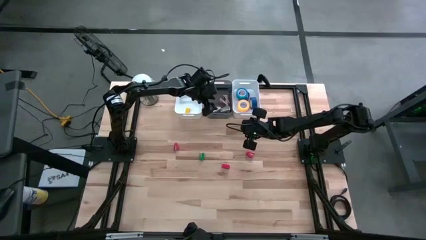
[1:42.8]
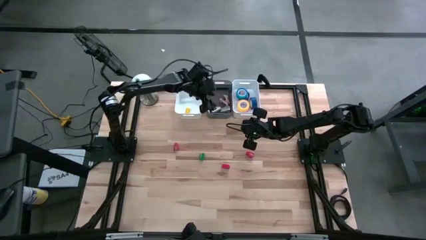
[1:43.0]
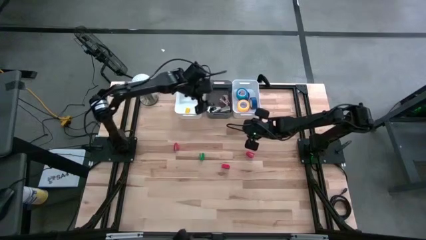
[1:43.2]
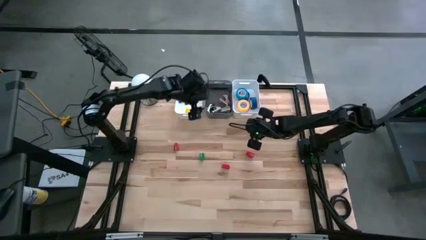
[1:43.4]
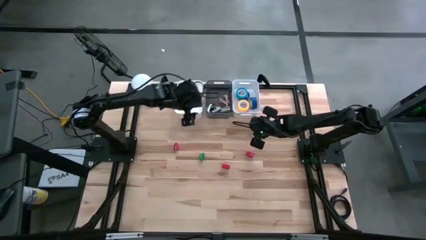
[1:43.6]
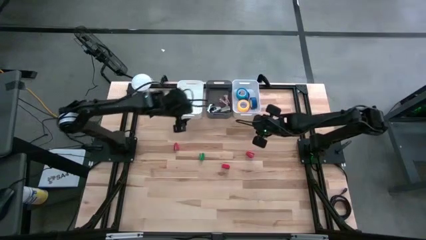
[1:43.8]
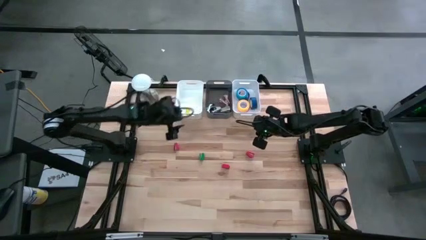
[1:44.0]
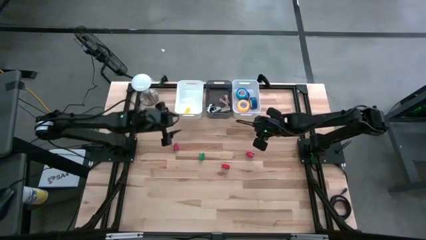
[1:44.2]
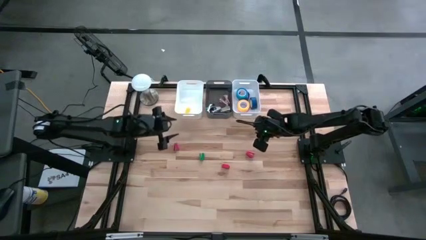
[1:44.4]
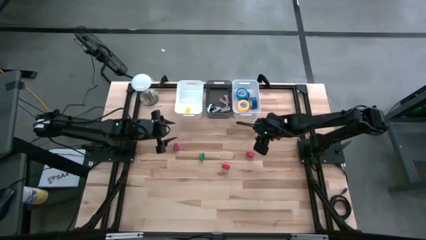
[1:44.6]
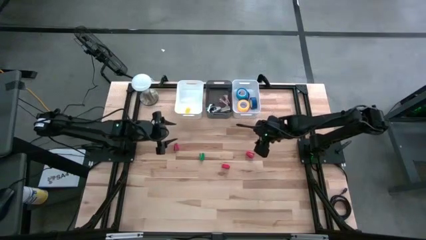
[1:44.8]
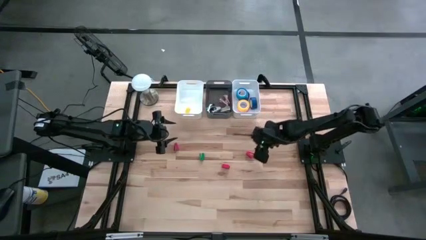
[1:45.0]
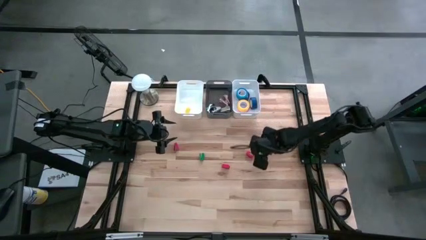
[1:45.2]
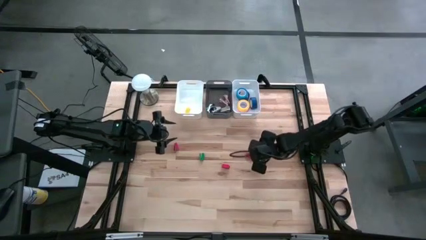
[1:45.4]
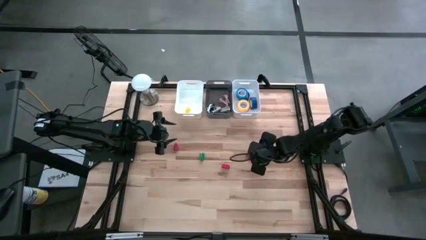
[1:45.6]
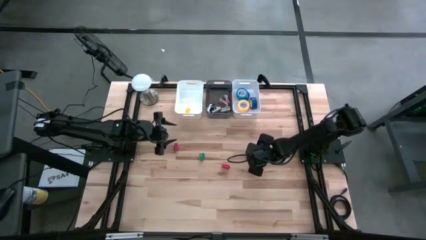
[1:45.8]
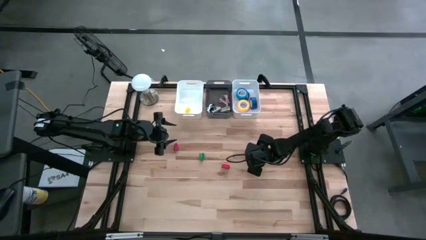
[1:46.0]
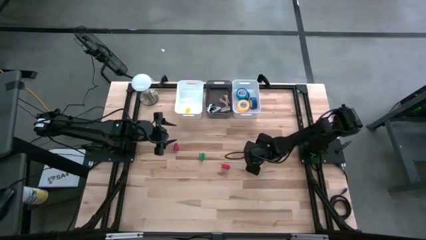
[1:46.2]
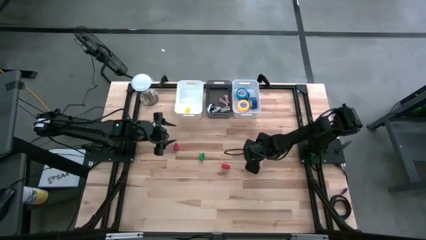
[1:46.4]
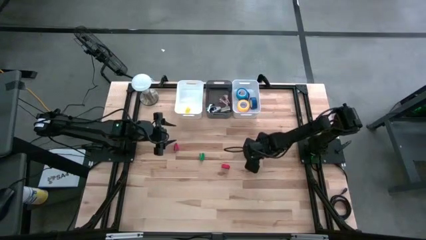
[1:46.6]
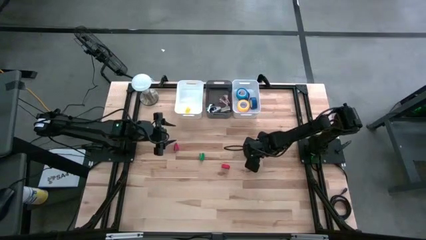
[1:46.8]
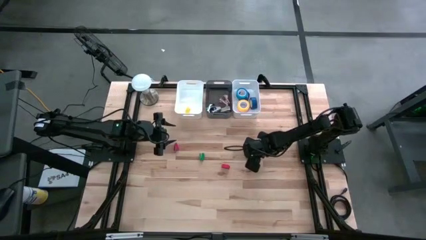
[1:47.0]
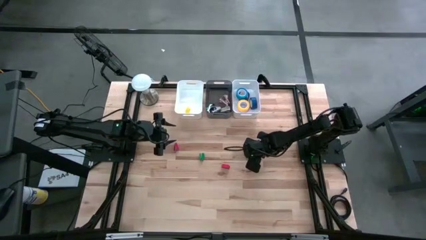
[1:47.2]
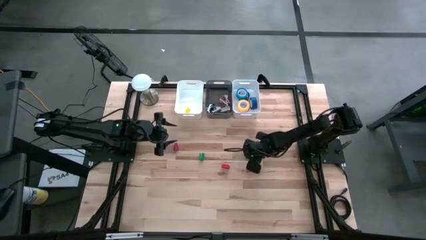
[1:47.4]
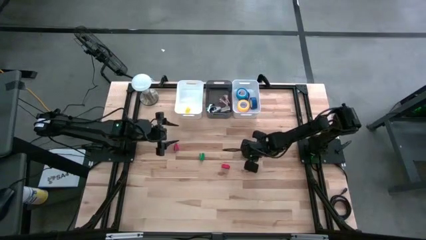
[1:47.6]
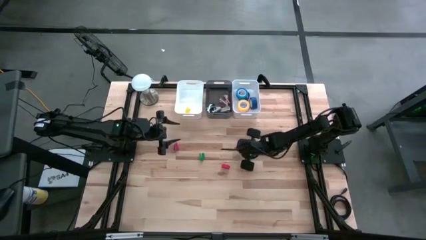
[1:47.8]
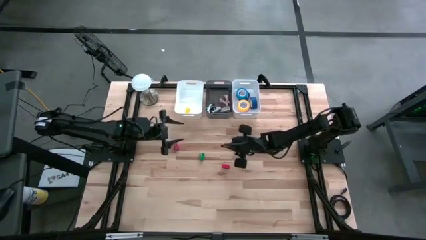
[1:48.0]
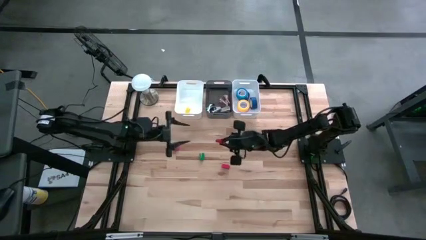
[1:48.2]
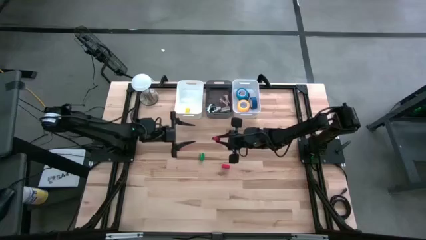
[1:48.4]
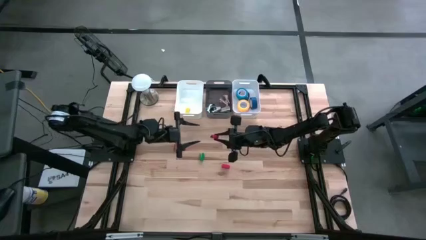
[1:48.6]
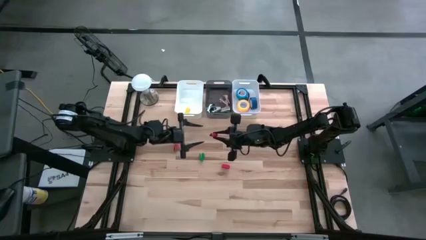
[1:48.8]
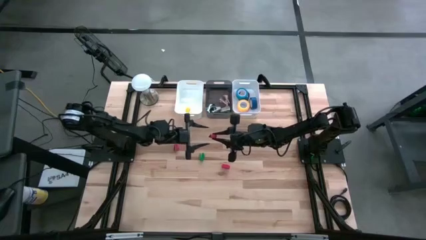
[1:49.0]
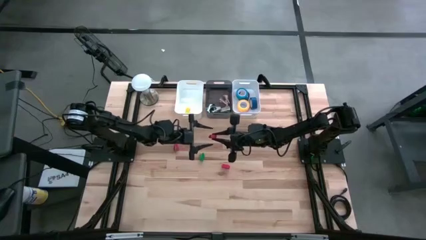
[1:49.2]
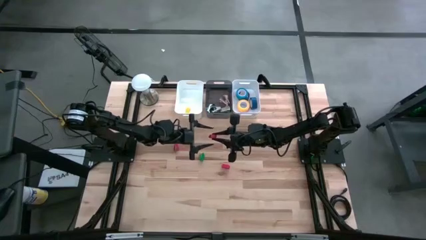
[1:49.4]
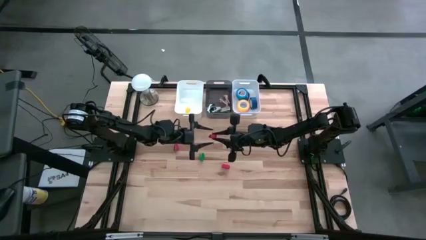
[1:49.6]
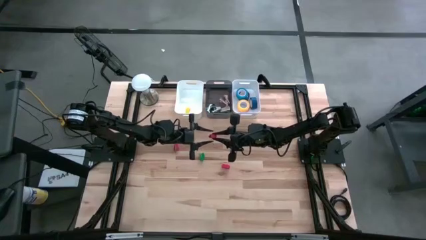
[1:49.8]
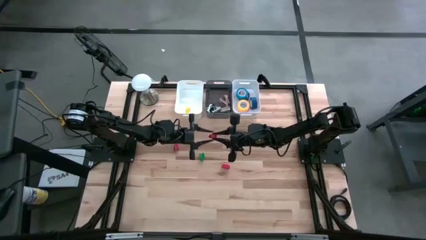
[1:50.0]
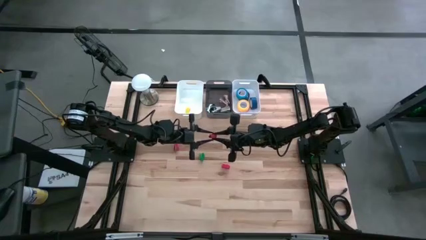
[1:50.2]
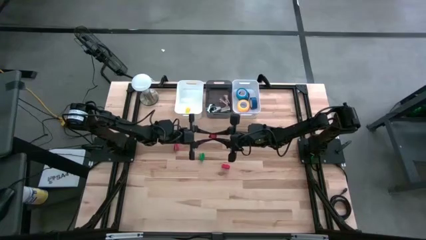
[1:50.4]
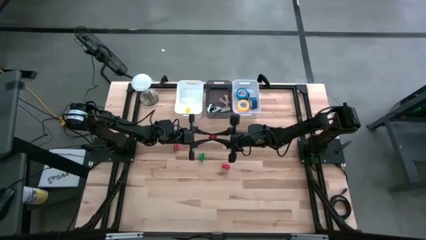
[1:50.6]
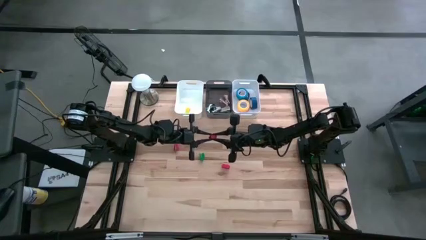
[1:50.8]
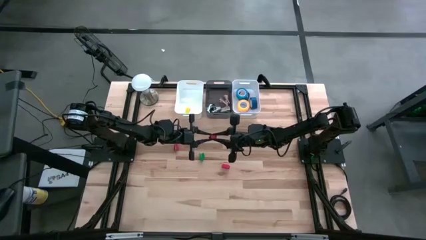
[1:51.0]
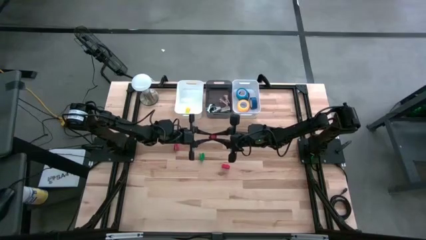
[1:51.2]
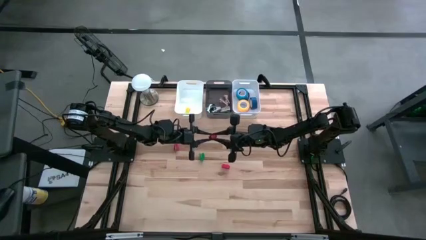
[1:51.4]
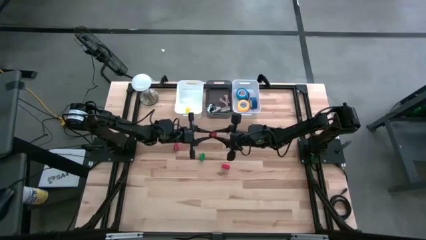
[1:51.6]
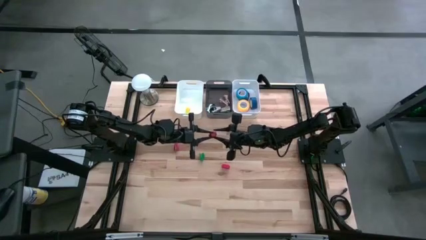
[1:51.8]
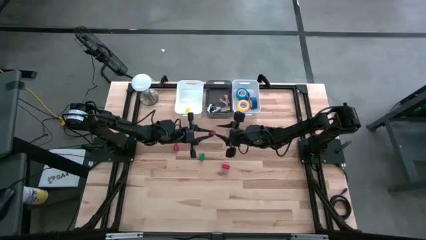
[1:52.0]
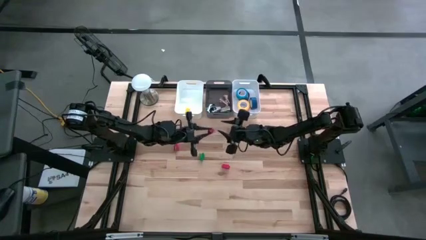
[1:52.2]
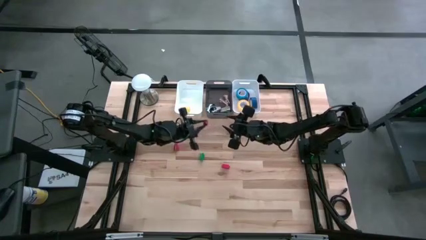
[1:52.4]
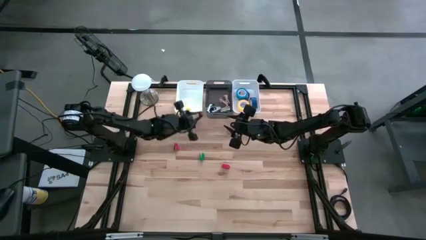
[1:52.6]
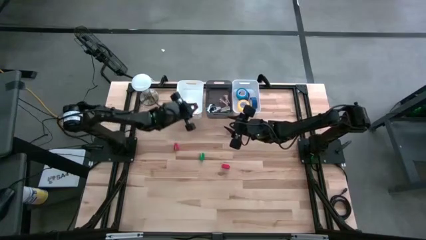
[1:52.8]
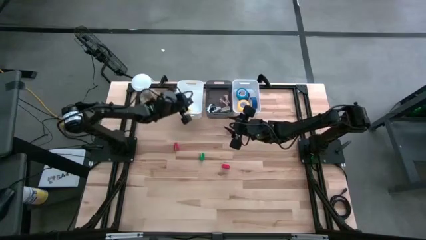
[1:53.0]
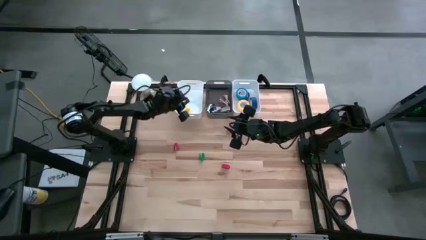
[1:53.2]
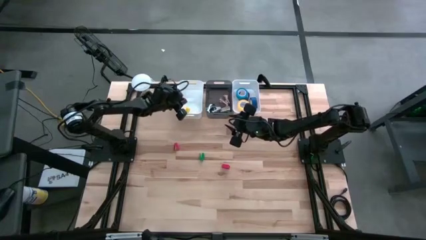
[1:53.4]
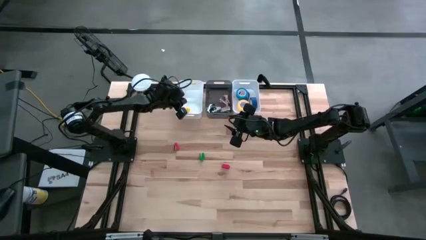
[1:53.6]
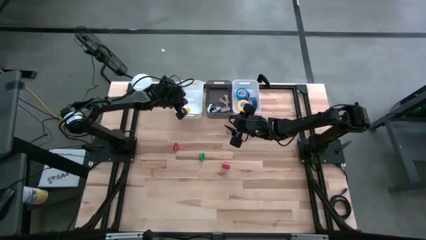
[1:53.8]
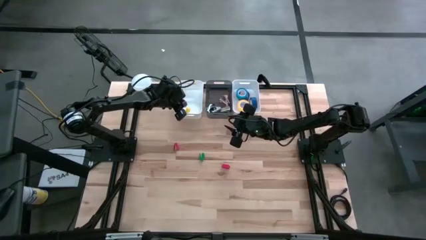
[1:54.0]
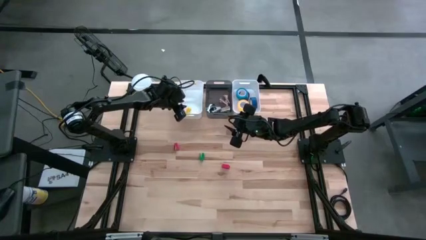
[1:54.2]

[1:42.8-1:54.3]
Task: Pick and place Stapler, Stapler remover, tape
Put the right red stapler into the left white bin

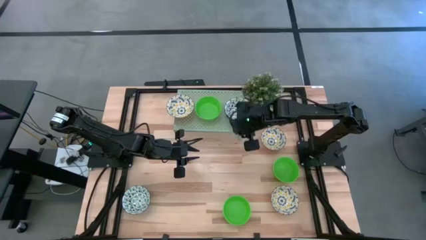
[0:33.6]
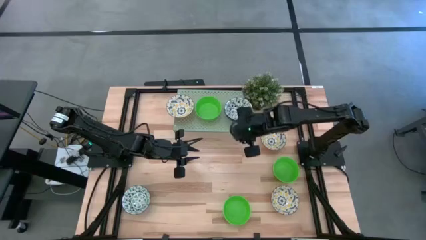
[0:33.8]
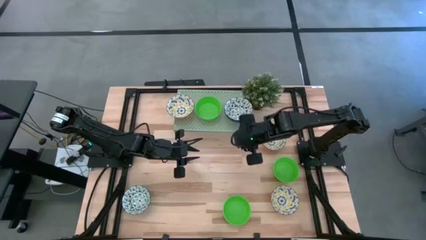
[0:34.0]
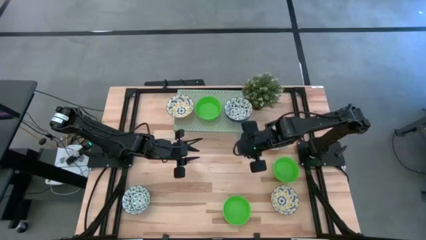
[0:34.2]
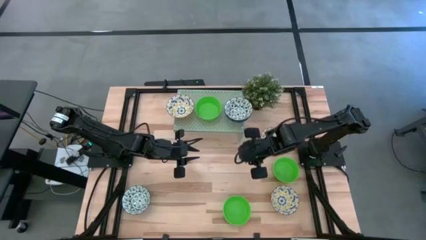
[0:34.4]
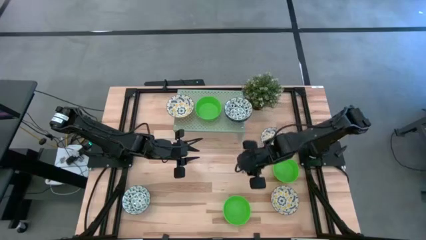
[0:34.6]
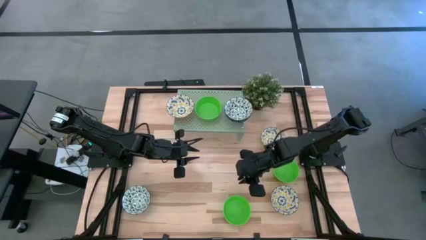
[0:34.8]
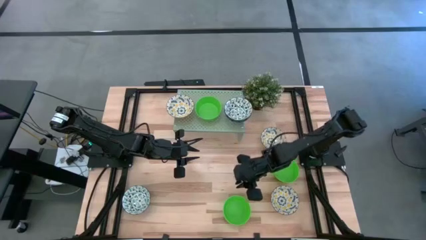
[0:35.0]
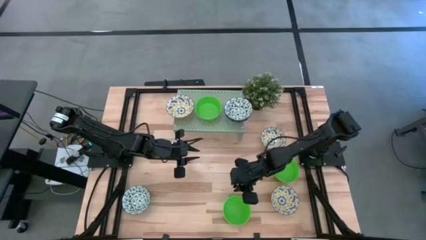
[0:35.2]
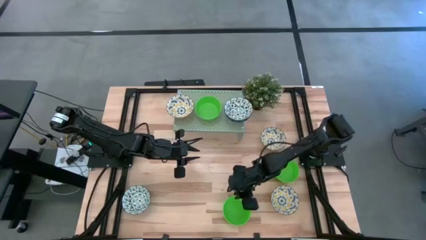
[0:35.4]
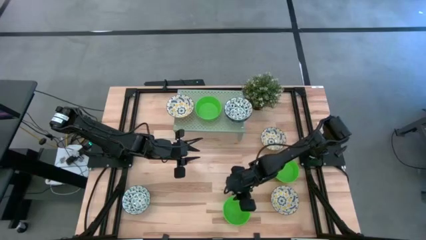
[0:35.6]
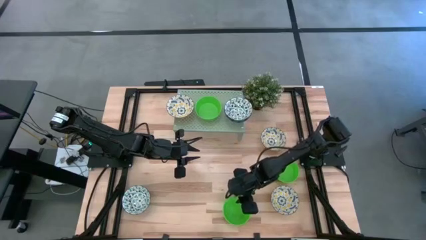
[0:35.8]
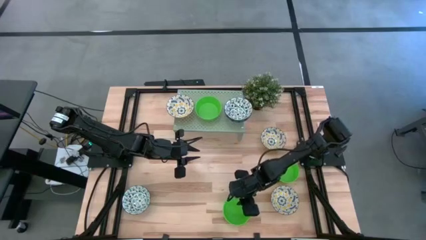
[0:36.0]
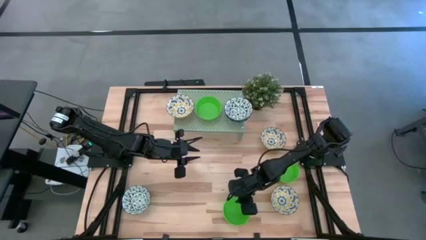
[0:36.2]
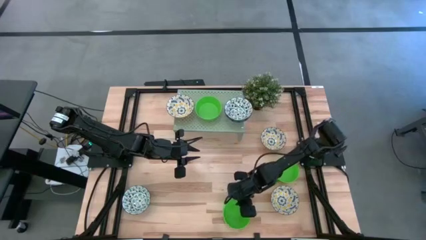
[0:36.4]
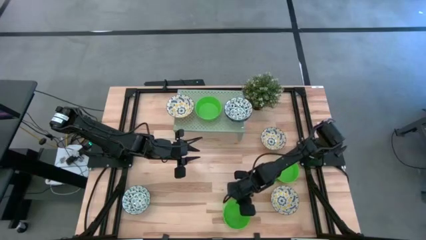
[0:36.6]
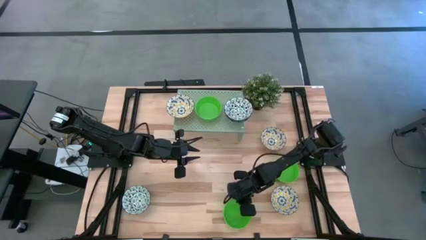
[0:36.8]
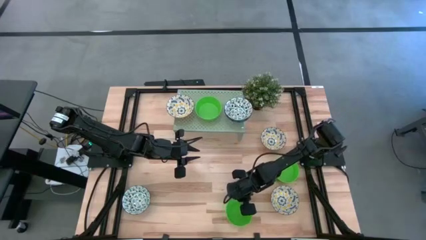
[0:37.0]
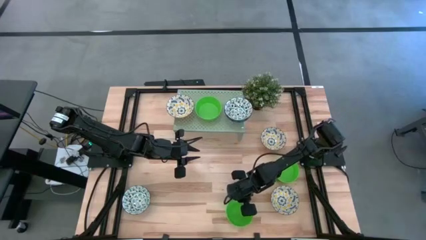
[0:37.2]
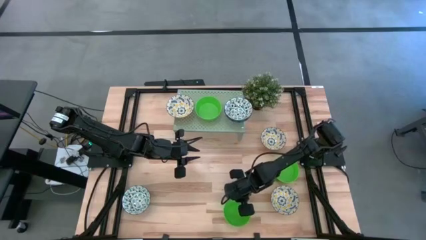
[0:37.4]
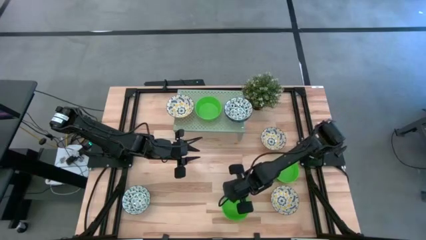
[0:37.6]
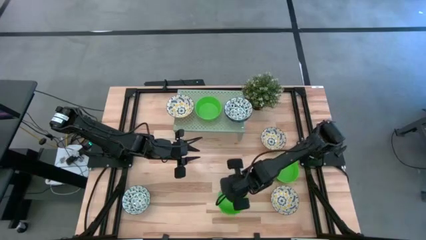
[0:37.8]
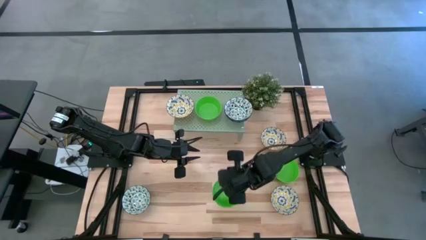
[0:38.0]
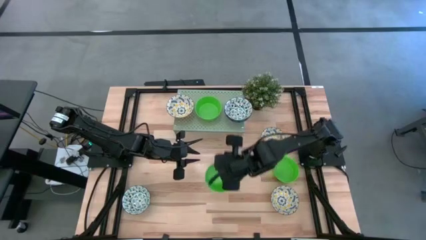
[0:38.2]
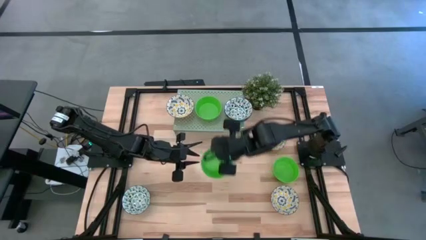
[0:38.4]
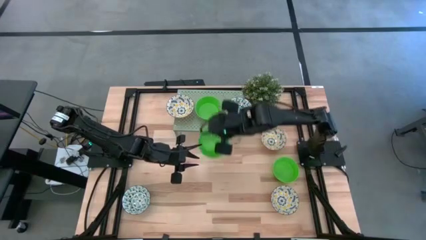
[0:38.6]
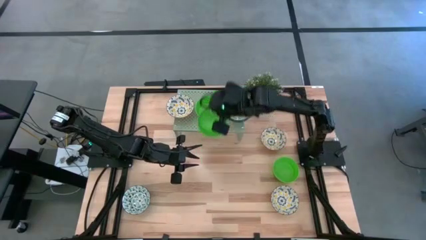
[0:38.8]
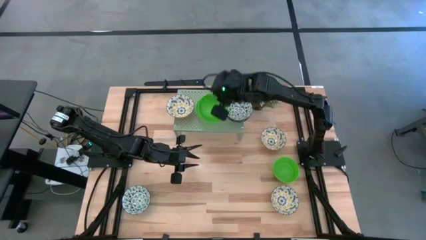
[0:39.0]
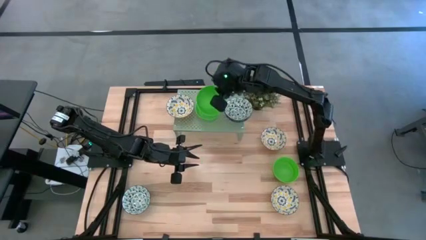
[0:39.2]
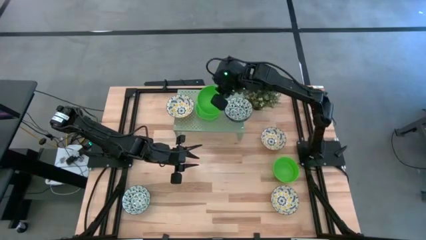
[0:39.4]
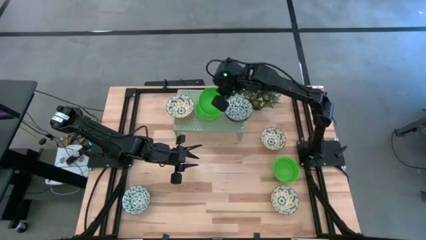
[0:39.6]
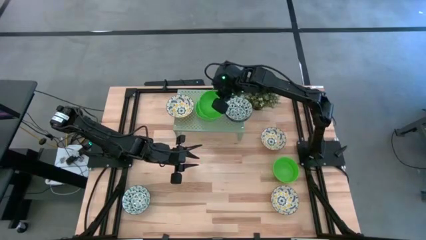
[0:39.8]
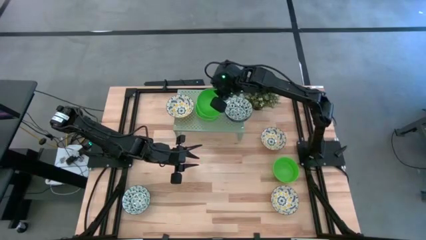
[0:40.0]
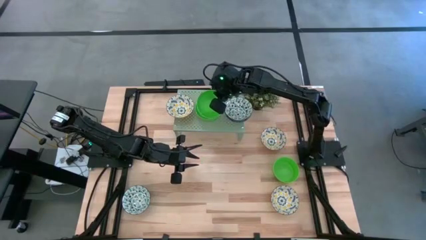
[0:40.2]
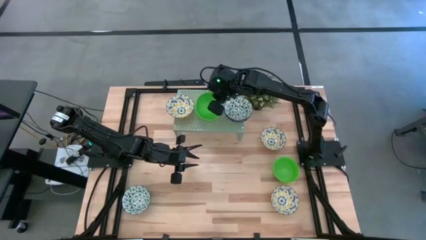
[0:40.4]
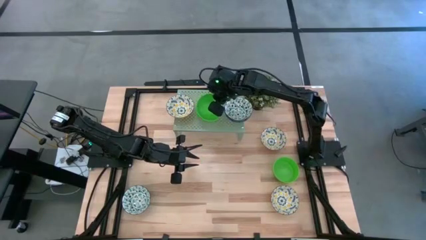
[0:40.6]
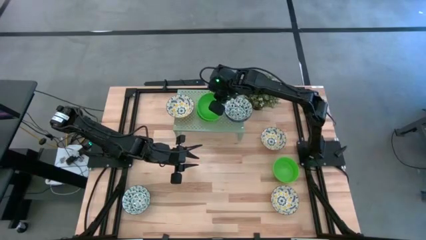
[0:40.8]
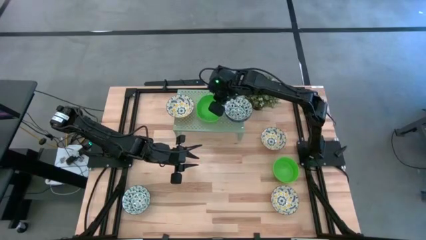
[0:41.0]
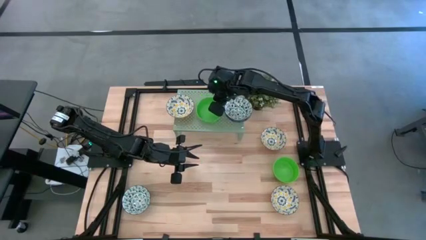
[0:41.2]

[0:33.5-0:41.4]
Task: Pick & Place Mini bowls
Stack the bottom green bowl on top of the green bowl on the shelf
